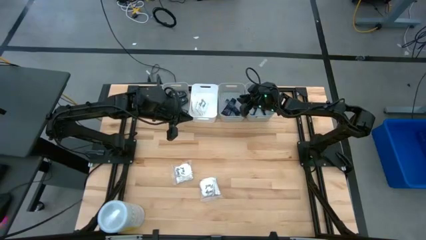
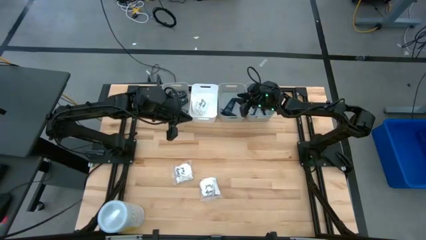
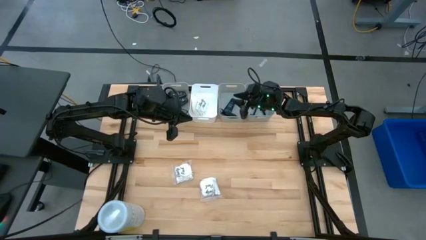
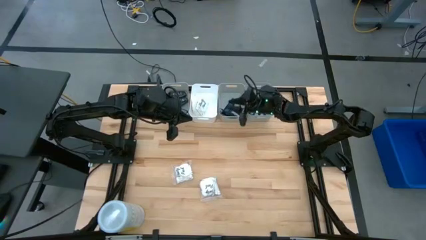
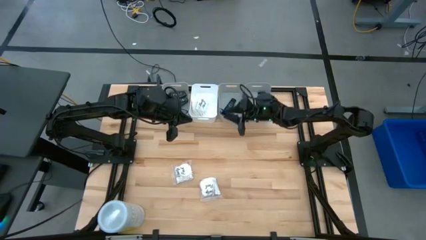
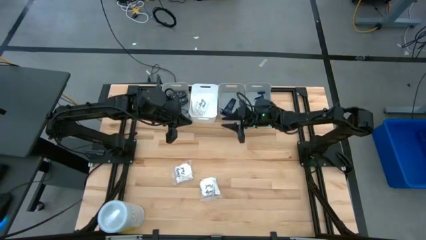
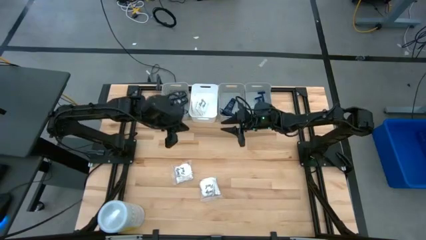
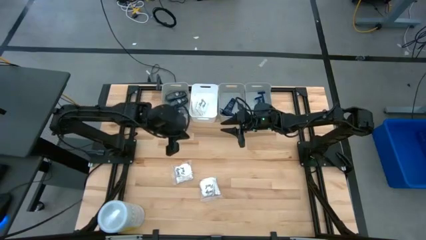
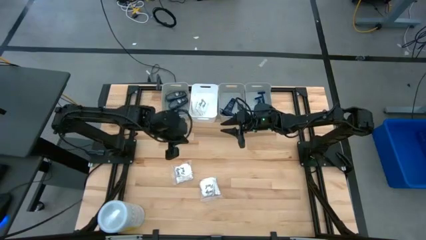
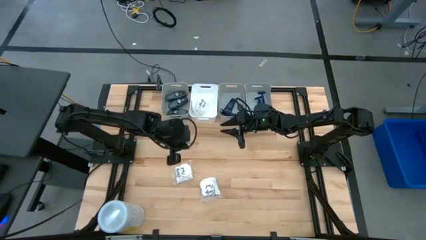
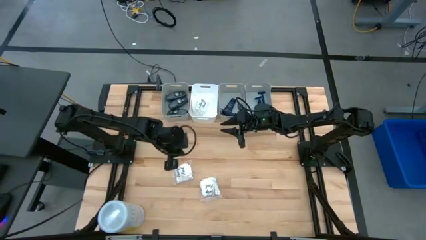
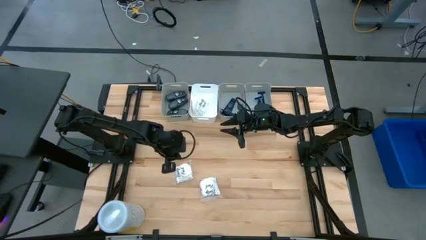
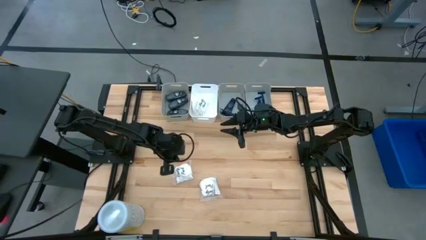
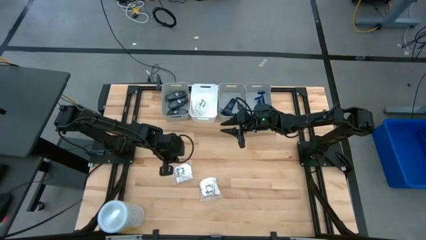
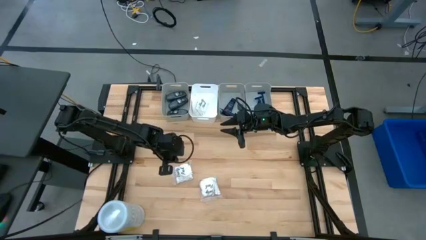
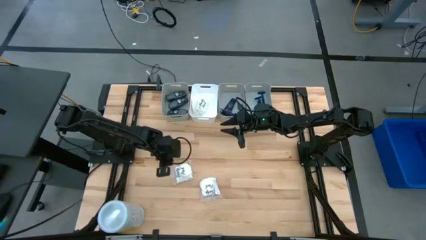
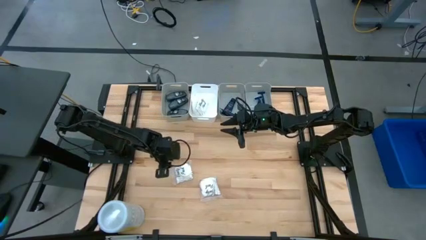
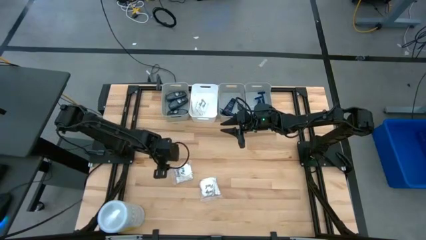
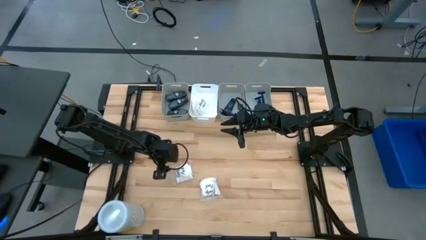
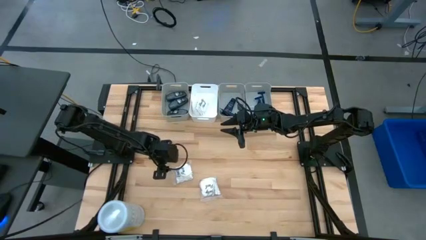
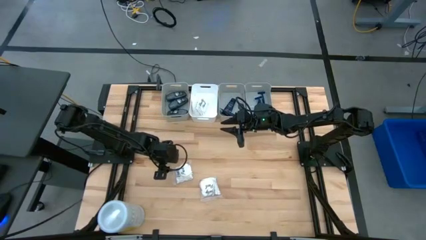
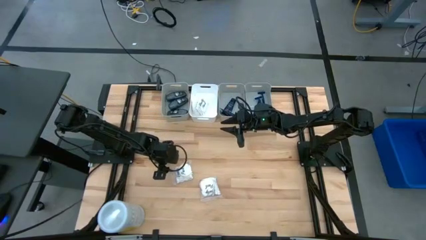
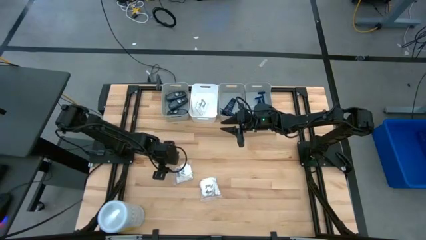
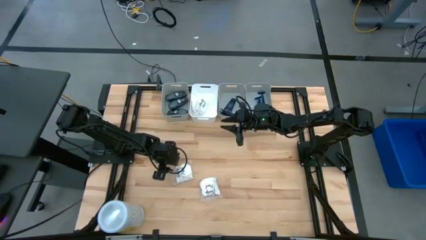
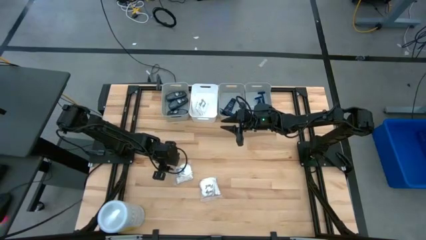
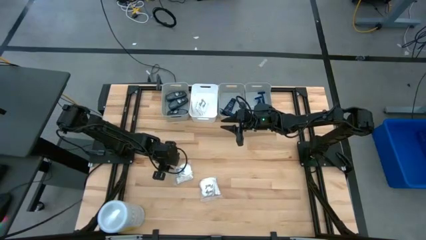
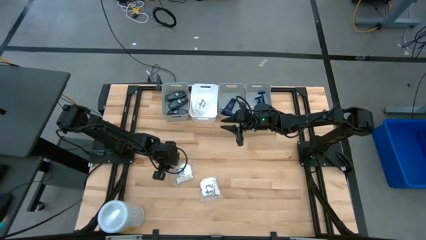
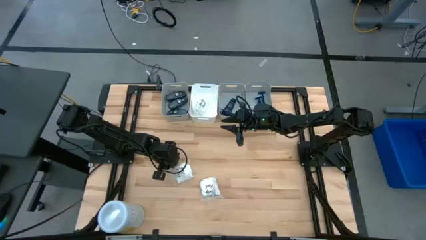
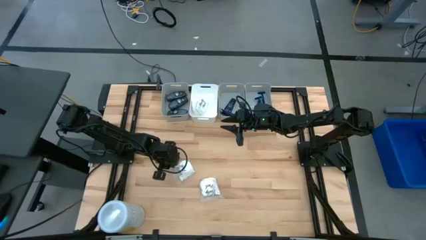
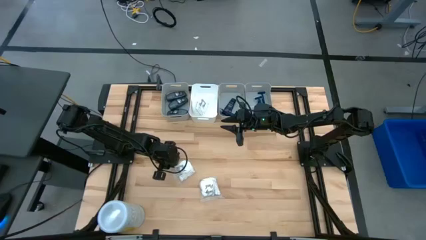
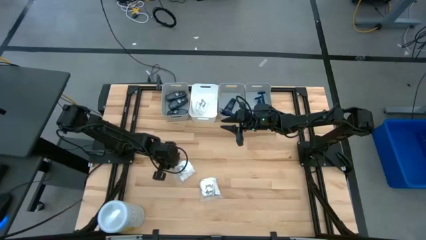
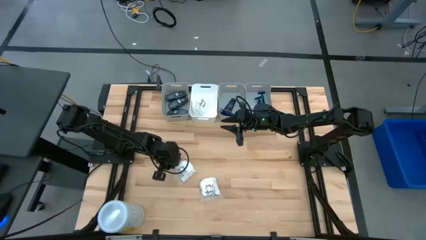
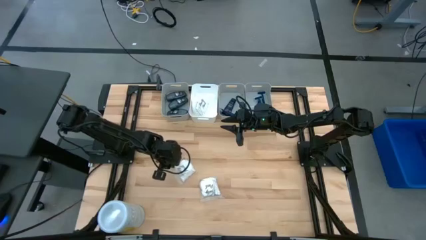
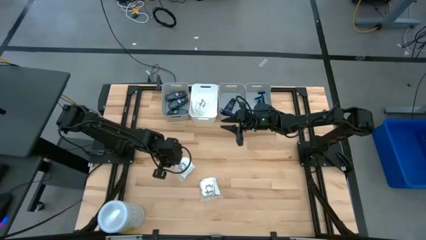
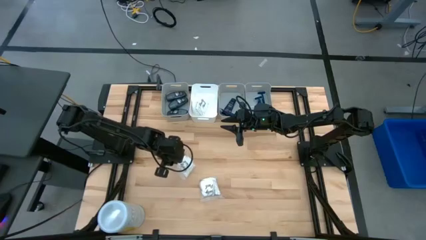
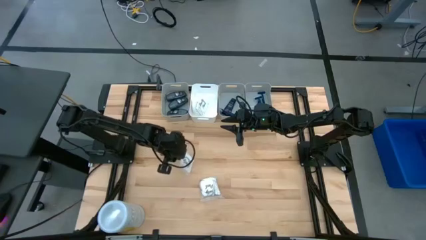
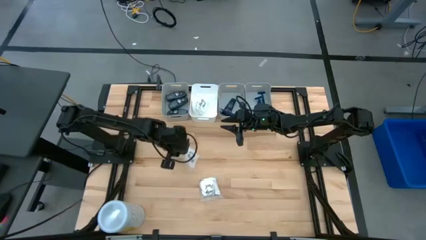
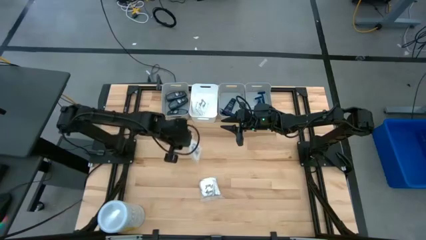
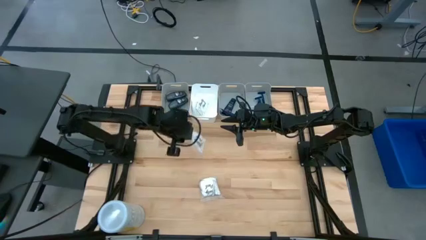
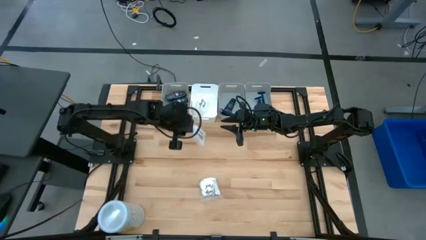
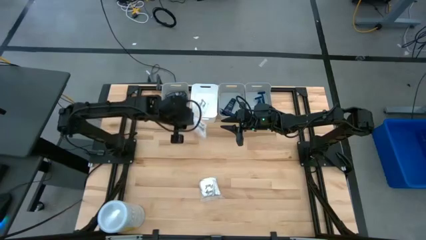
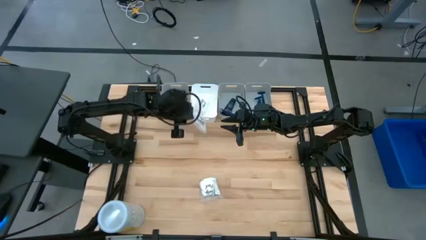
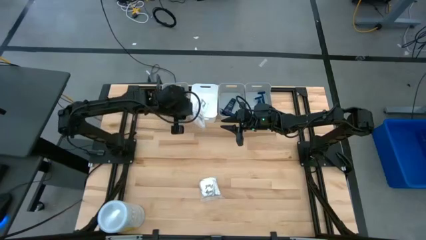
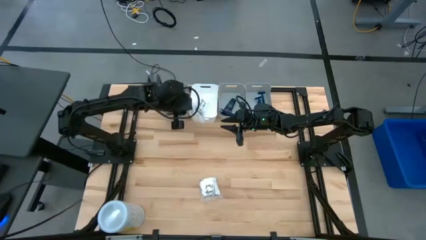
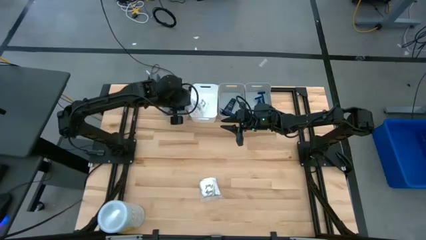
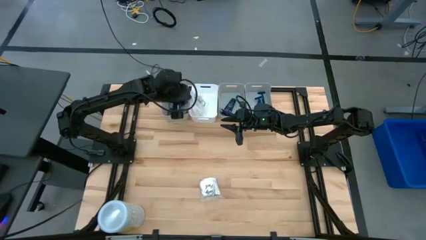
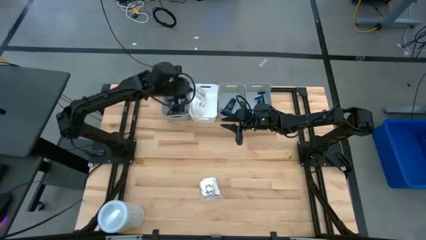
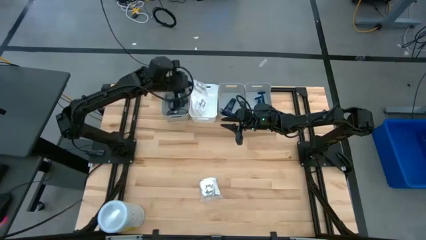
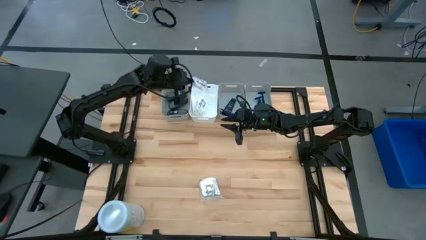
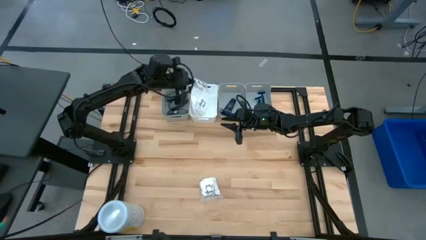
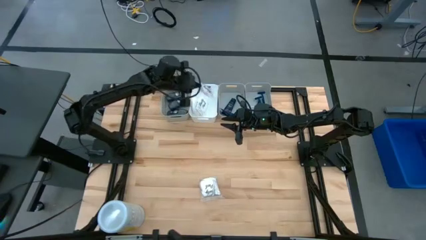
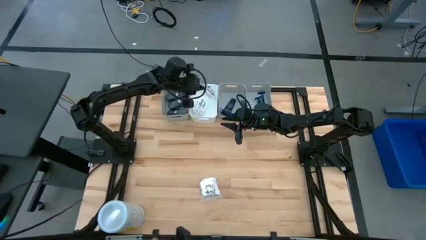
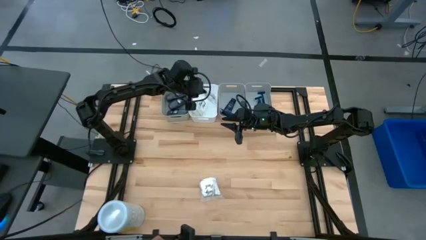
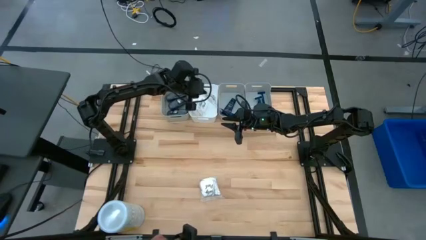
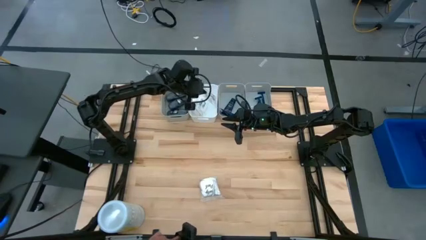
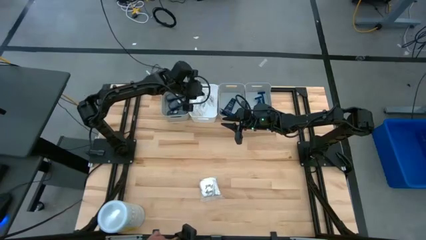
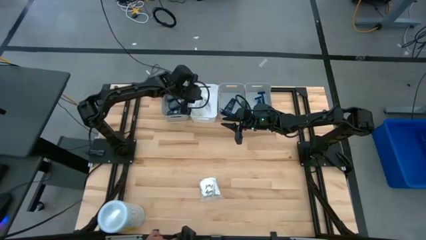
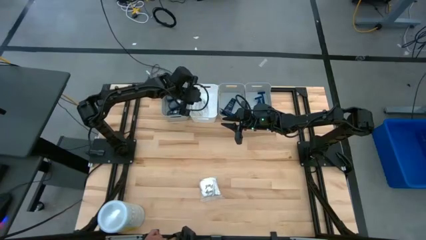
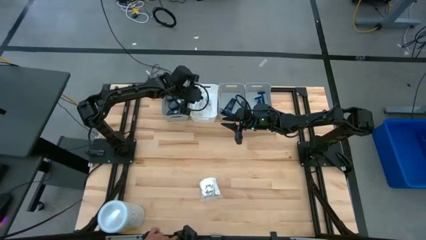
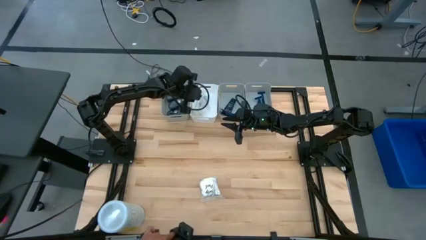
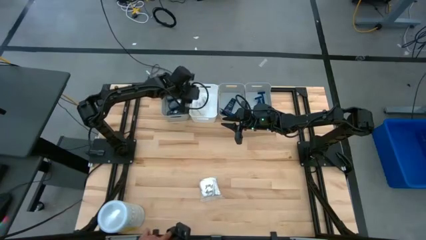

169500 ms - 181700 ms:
Task: Pick & Place Travel size toiletries
Put the white cotton pack into the white bin
